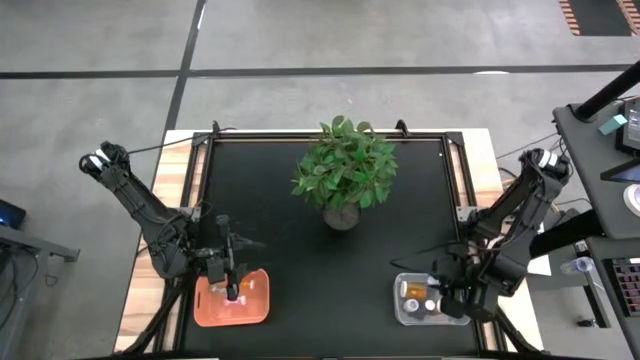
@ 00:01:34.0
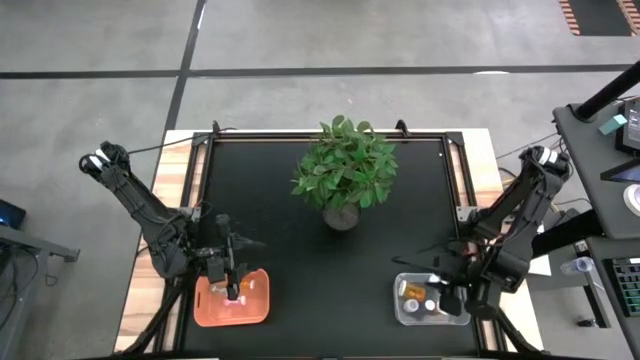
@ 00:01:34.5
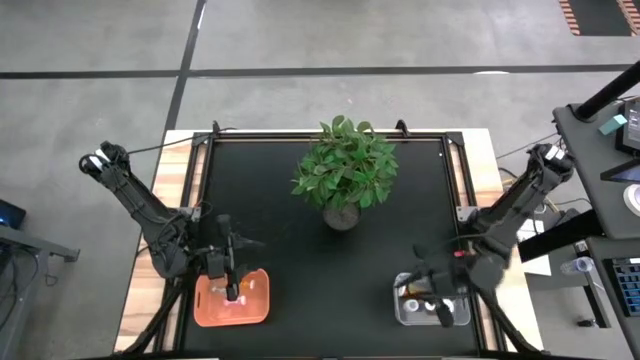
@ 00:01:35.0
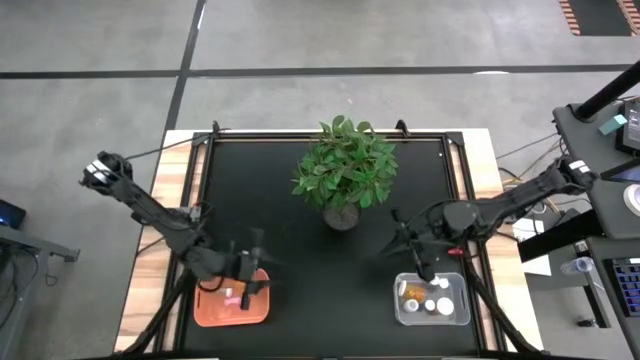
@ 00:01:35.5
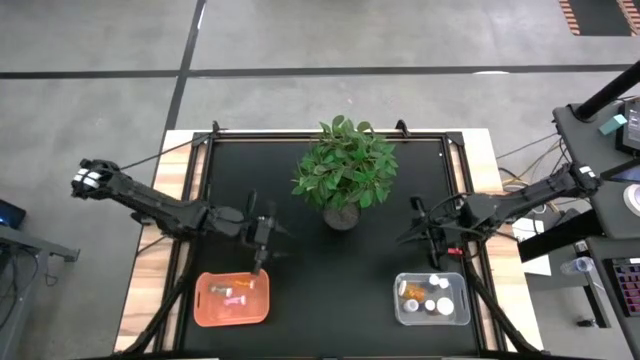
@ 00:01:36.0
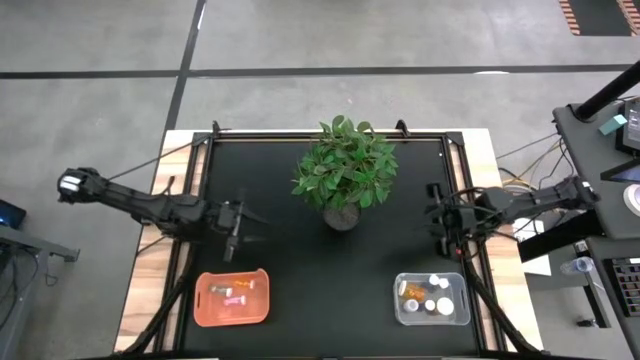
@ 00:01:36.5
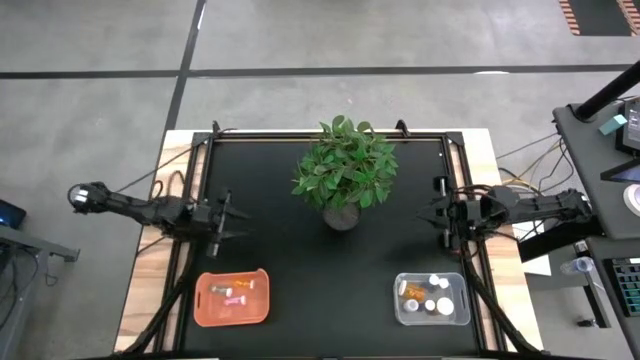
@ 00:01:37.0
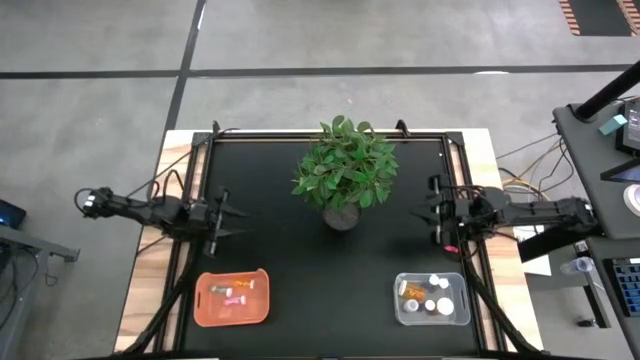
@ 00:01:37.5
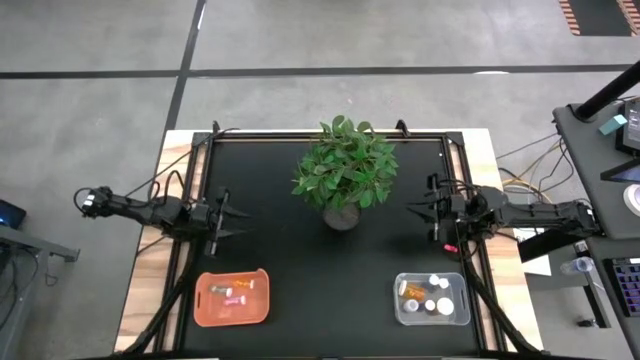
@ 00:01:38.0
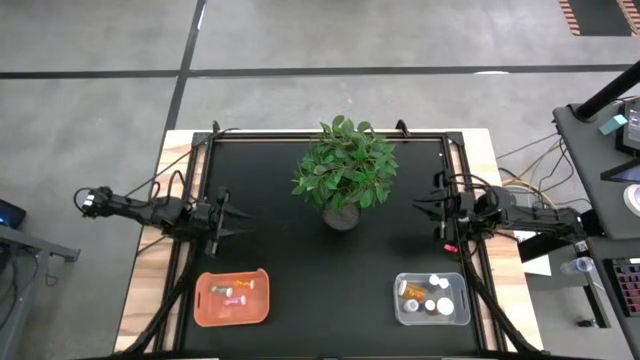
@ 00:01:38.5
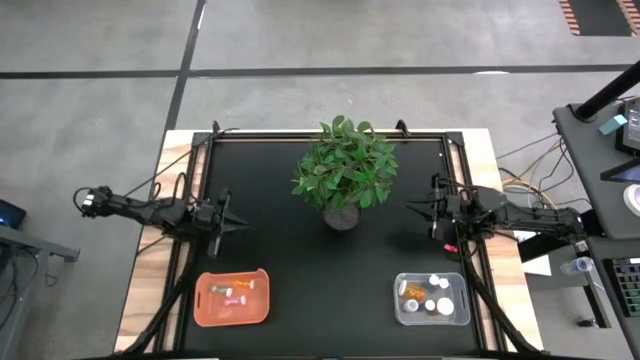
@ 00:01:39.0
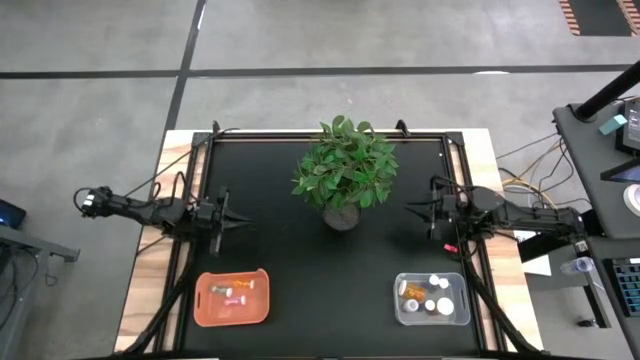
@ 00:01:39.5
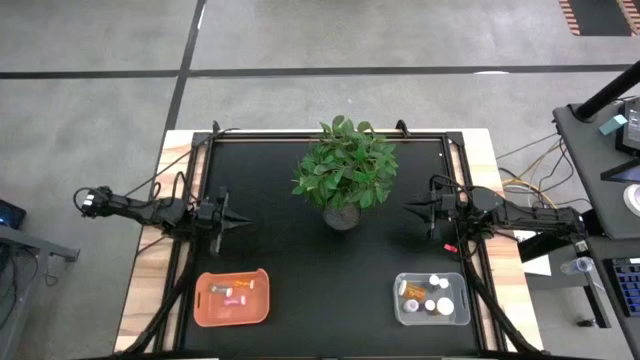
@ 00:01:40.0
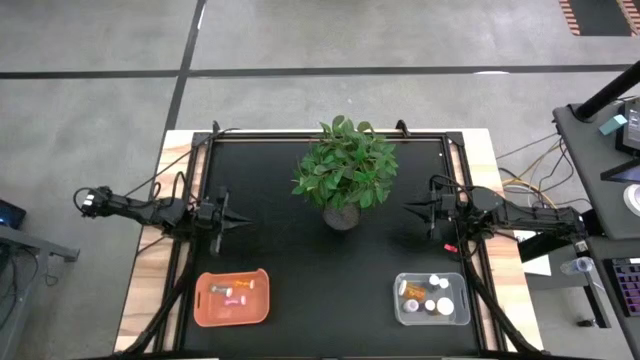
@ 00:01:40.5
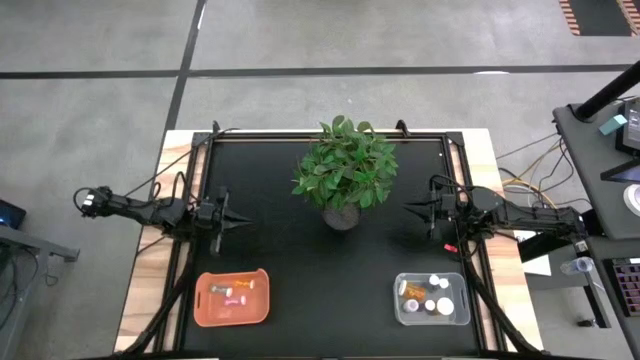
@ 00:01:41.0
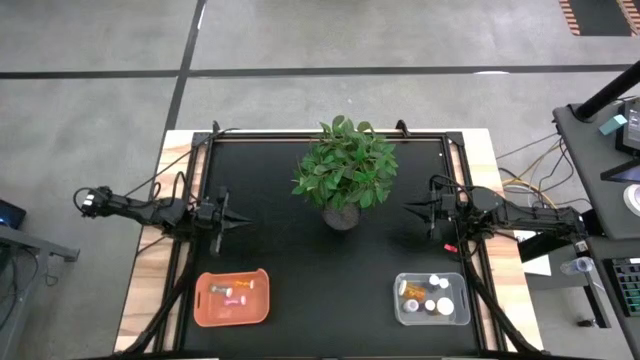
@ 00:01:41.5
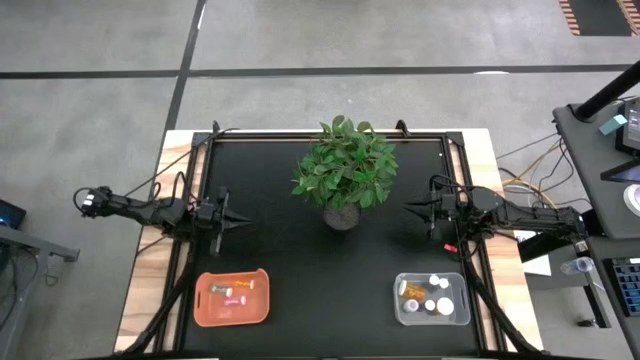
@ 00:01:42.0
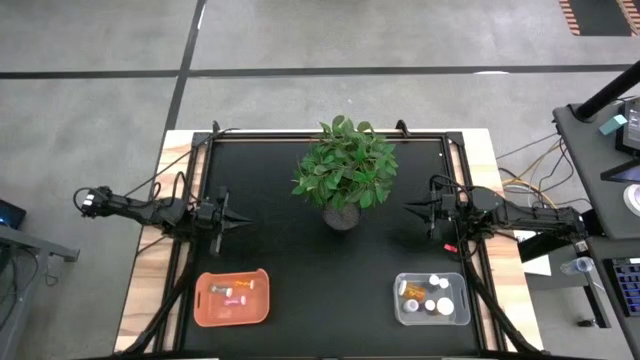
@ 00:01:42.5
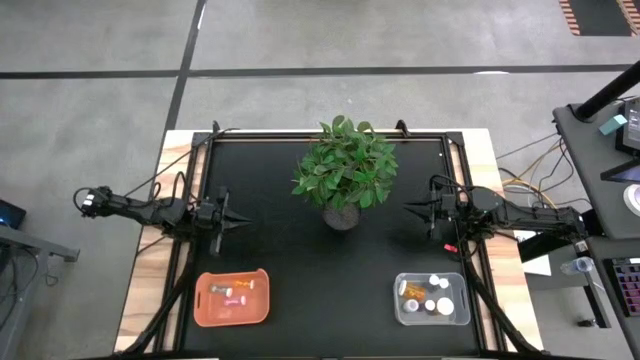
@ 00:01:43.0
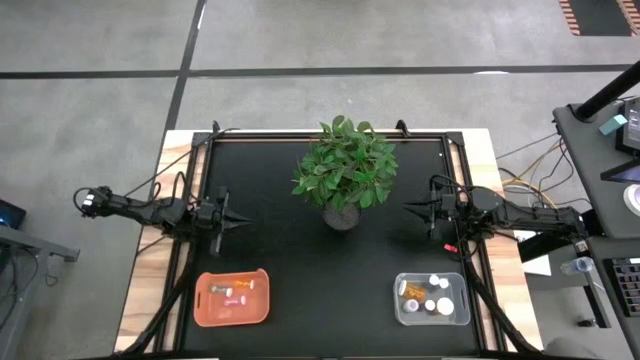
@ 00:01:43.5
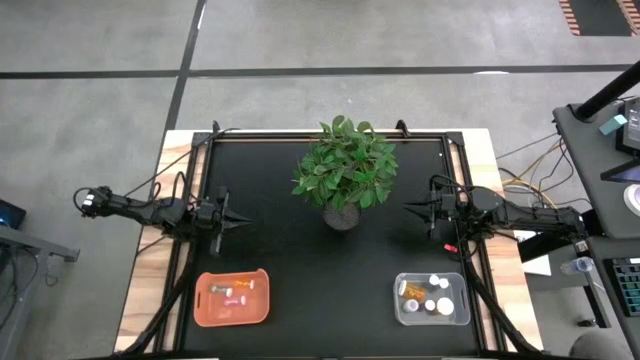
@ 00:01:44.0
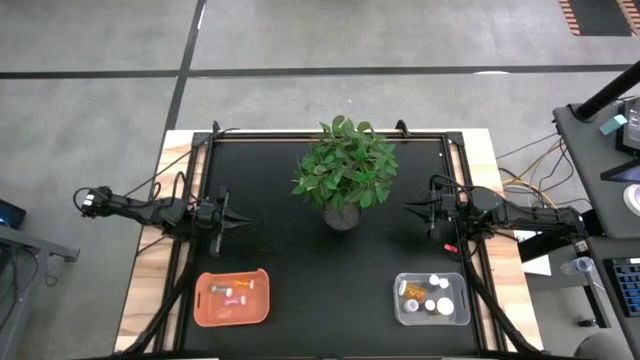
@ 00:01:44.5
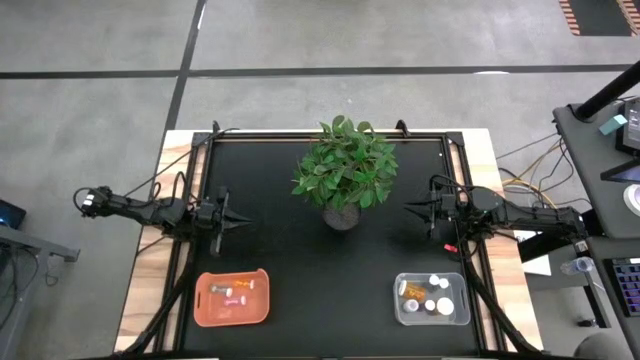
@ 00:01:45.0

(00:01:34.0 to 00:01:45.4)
Task: Pick and place medicine bottles into bin by pill shape (circle, oval)
Return to Home Position

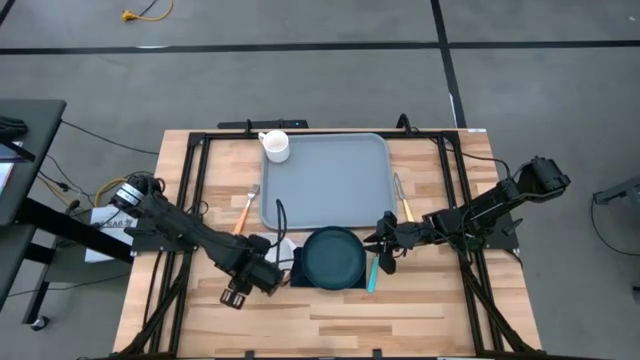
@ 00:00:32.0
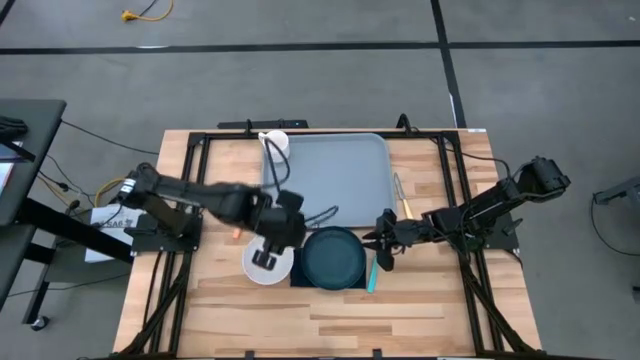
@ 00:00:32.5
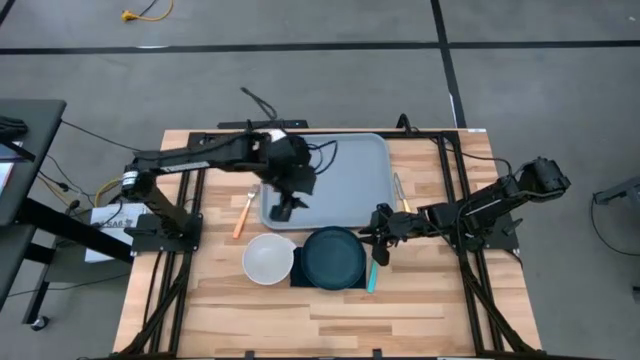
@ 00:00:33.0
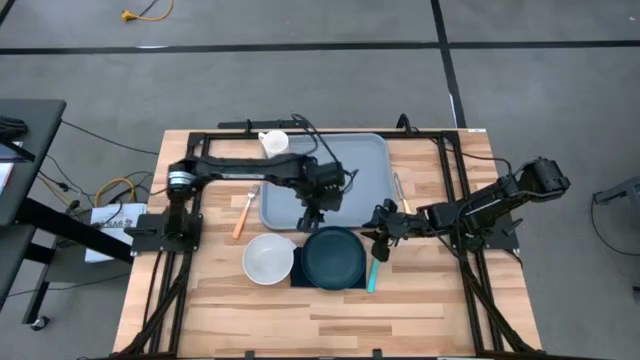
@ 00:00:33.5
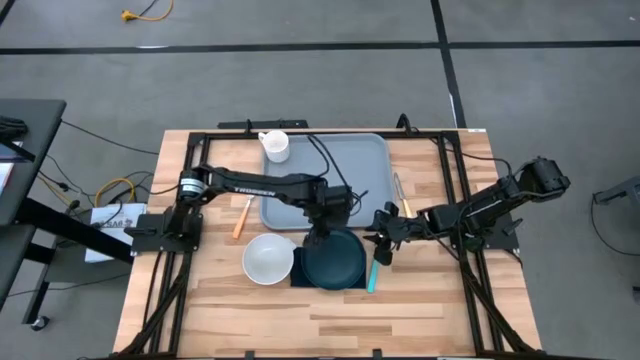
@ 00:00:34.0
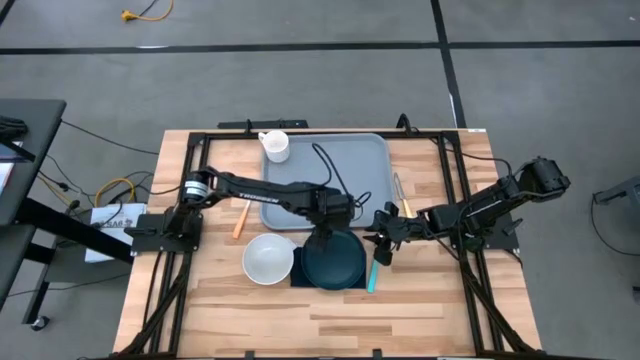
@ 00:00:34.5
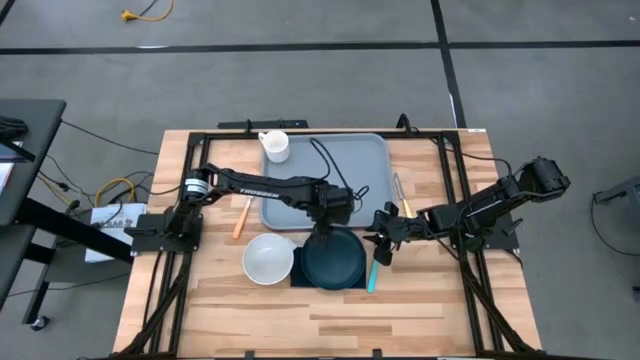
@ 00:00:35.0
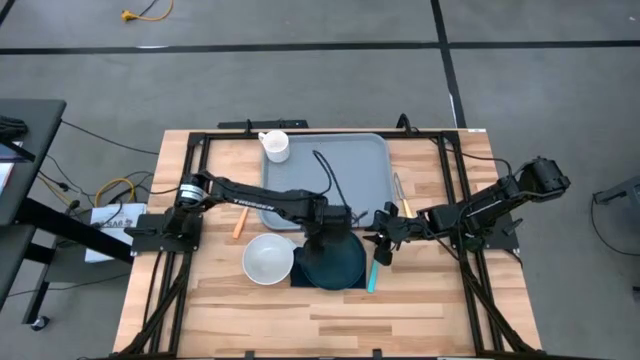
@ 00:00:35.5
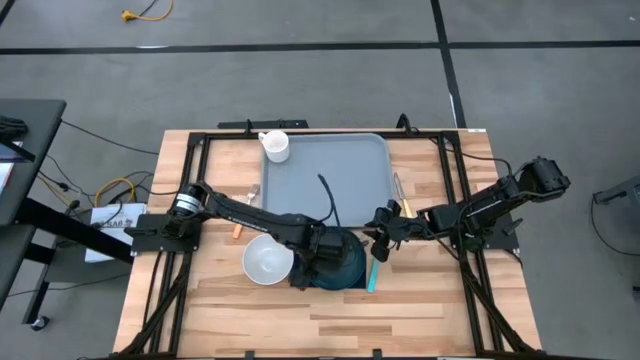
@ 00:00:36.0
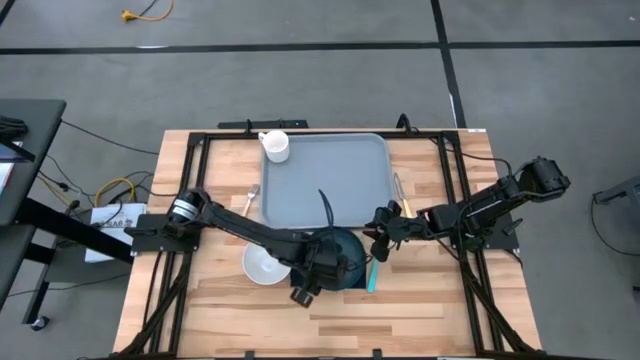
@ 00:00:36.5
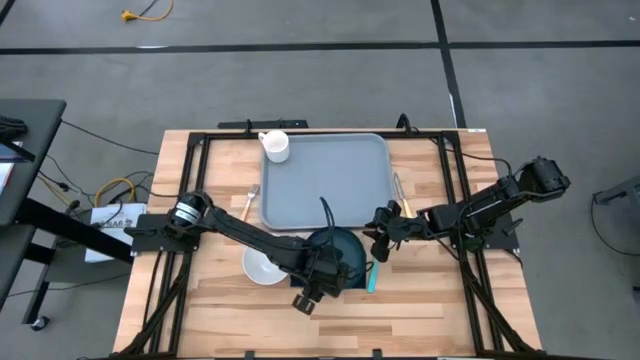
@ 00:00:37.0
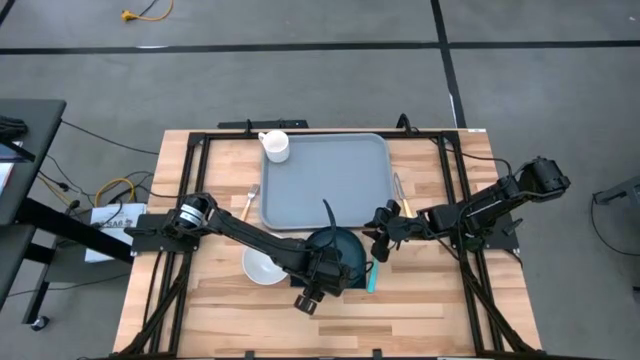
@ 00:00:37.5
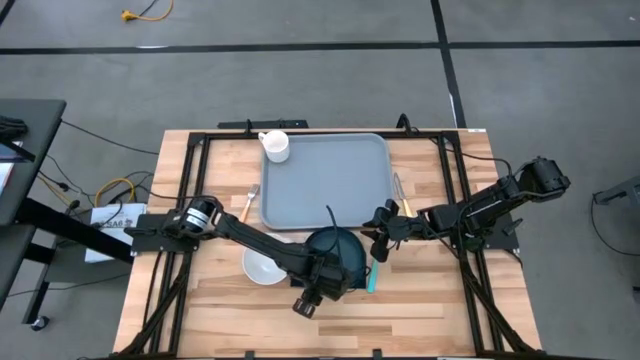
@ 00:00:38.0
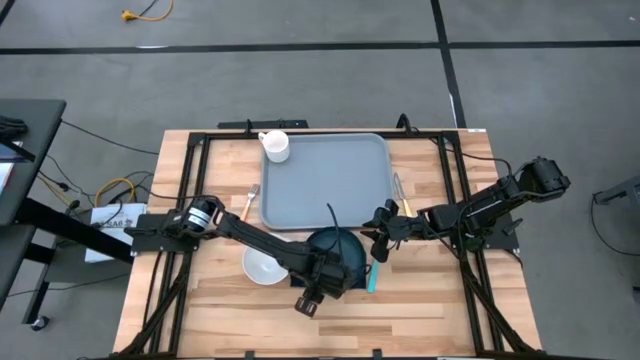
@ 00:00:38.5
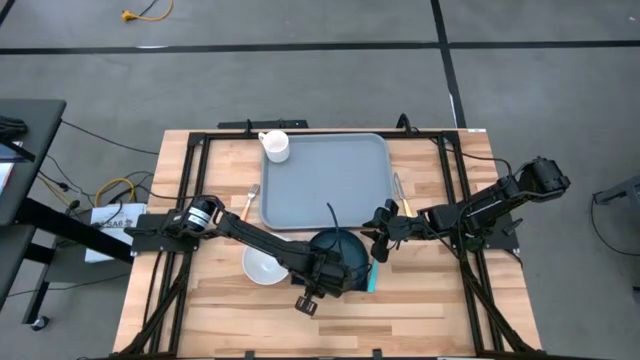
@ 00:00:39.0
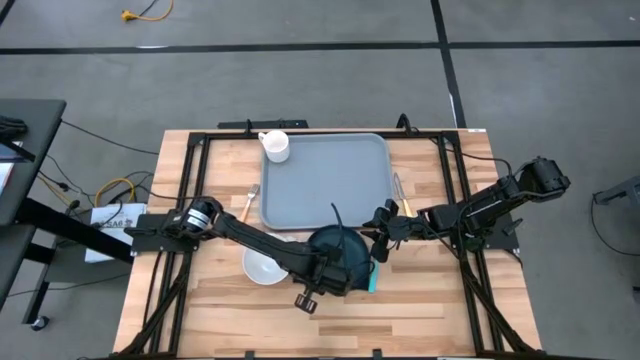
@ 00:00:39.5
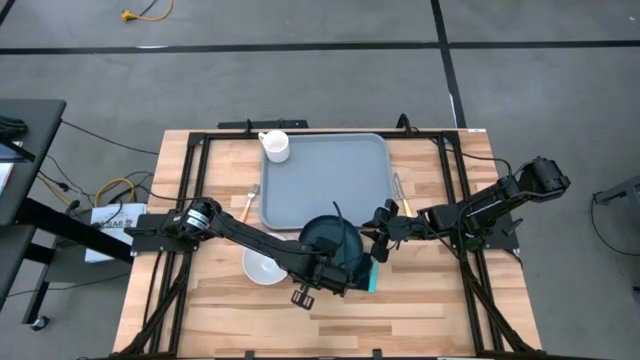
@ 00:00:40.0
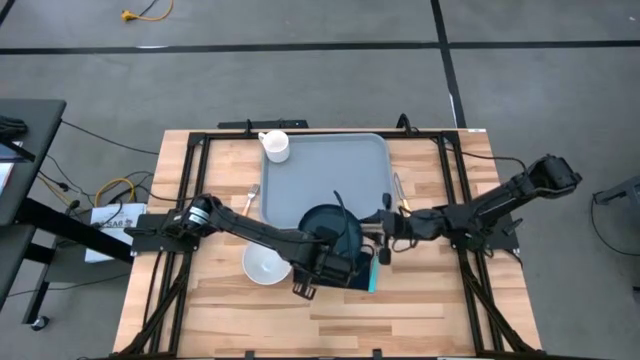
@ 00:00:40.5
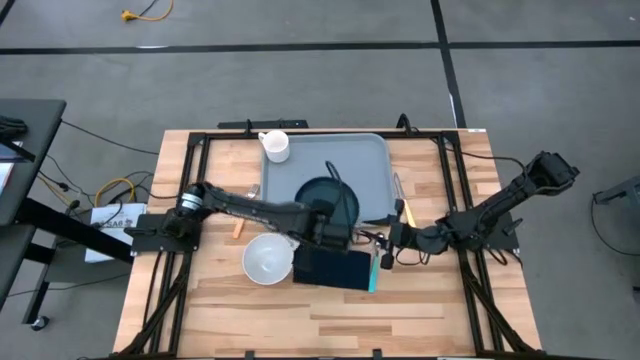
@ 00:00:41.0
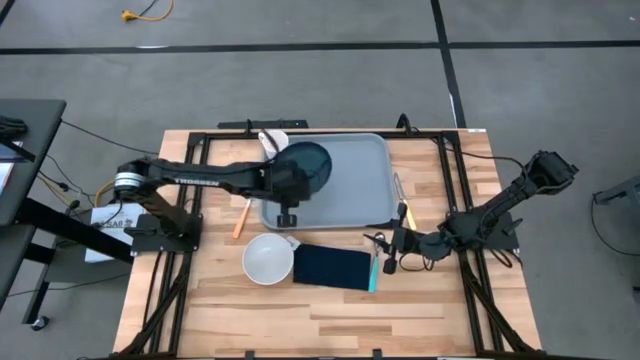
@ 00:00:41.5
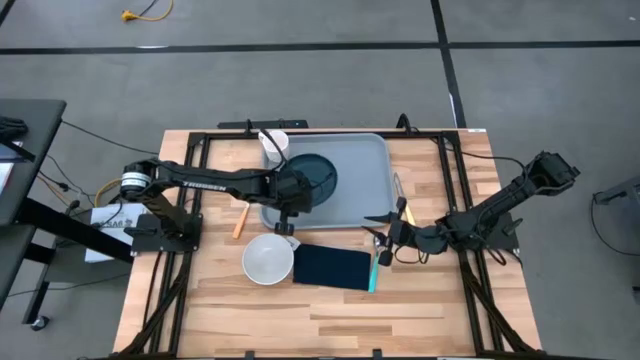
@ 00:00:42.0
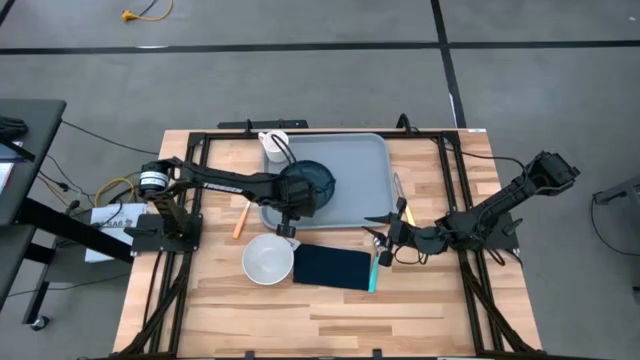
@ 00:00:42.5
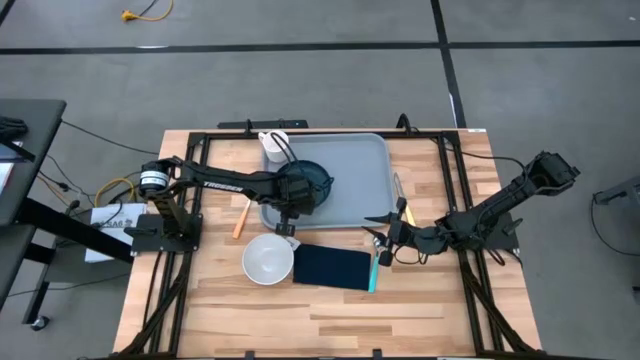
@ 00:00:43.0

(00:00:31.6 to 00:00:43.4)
Task: Set up tray
Put the green plate below the white mug on the gray tray
